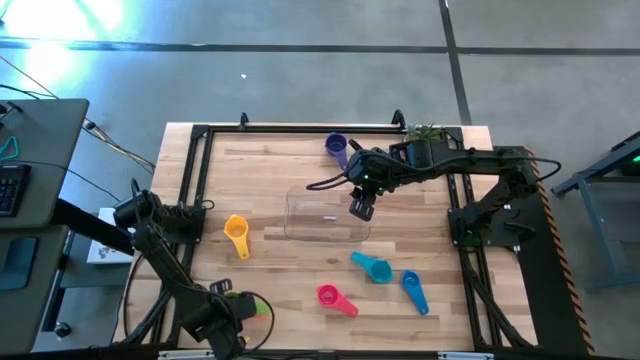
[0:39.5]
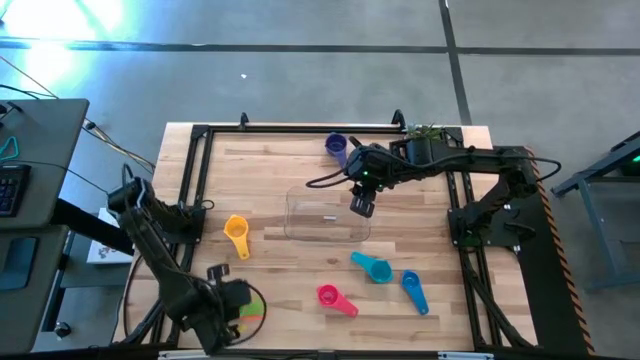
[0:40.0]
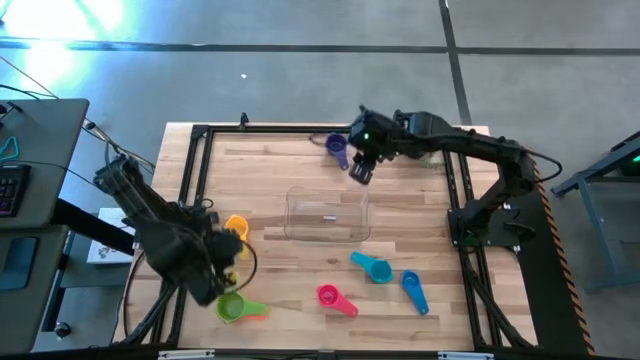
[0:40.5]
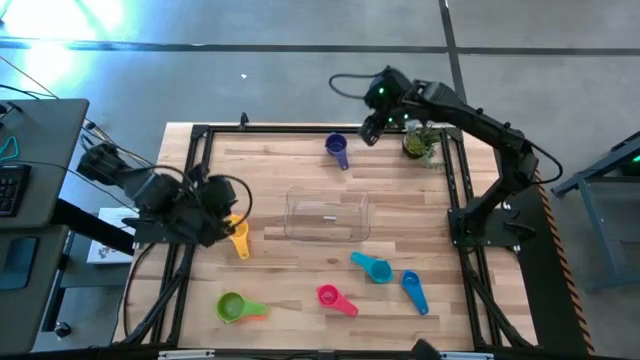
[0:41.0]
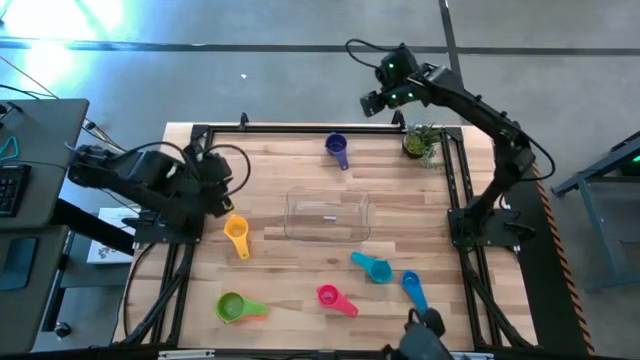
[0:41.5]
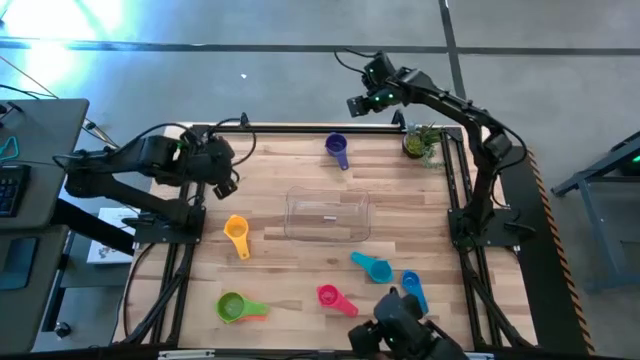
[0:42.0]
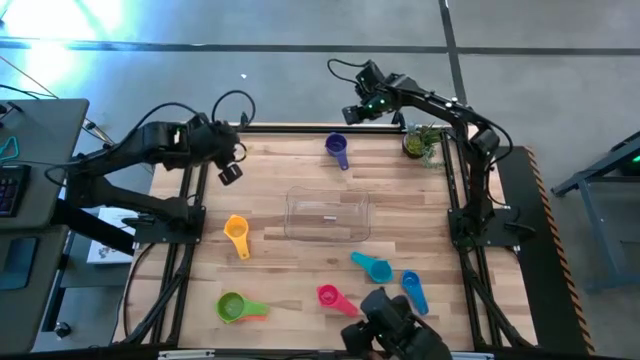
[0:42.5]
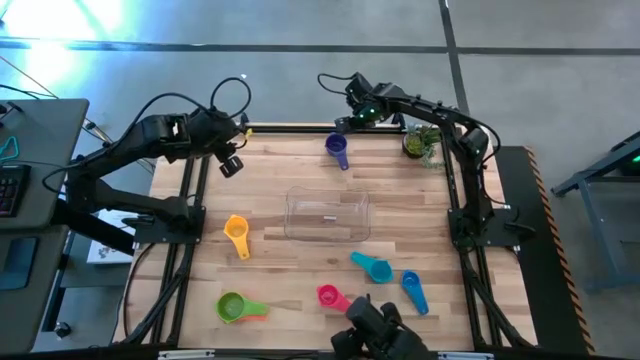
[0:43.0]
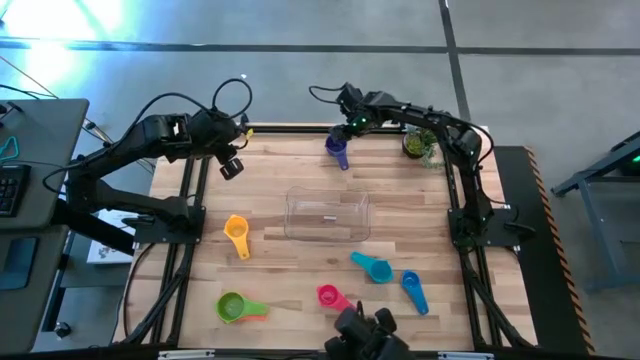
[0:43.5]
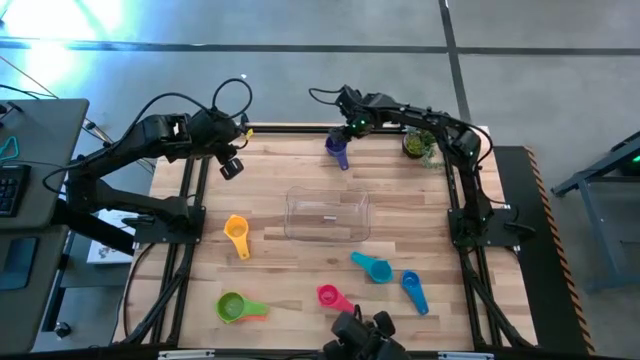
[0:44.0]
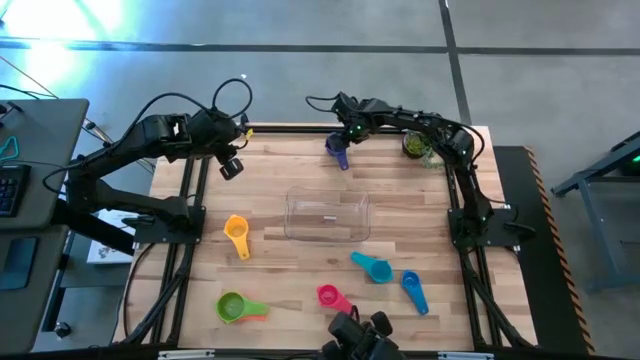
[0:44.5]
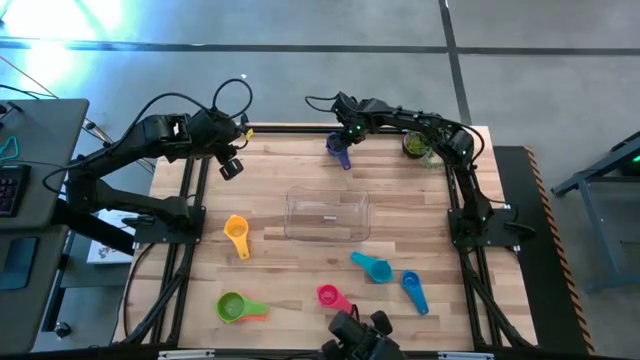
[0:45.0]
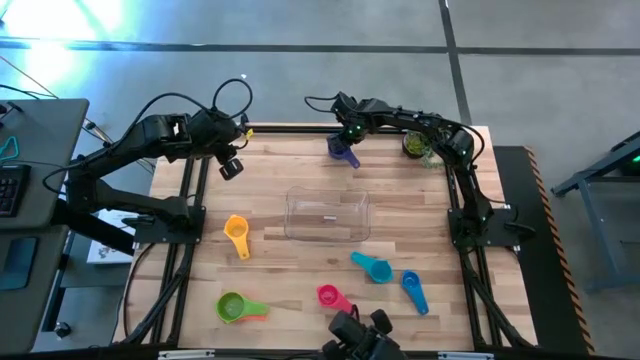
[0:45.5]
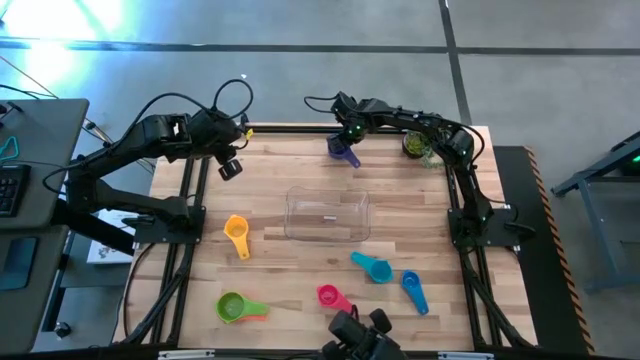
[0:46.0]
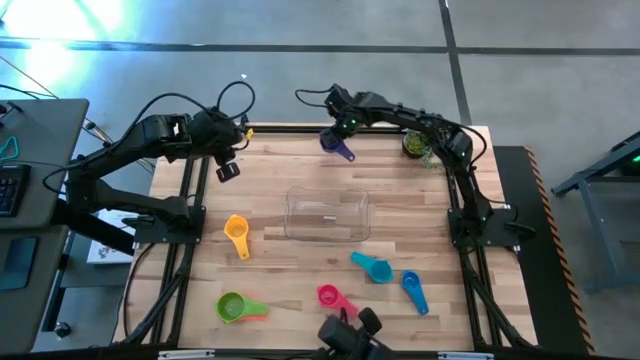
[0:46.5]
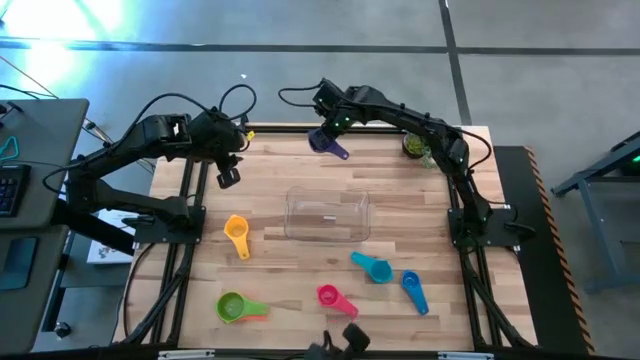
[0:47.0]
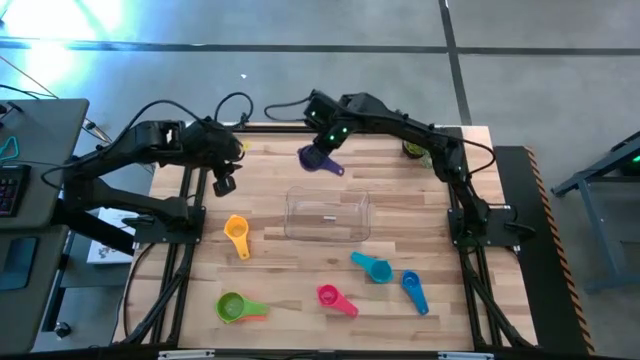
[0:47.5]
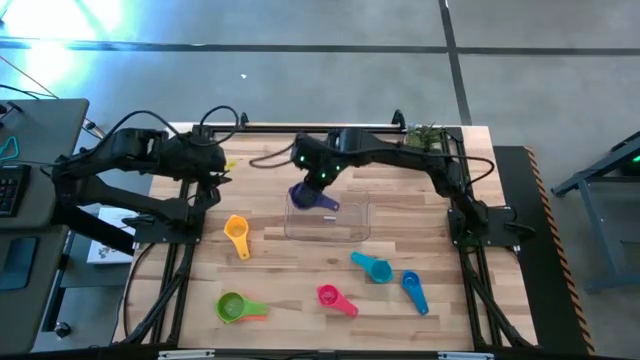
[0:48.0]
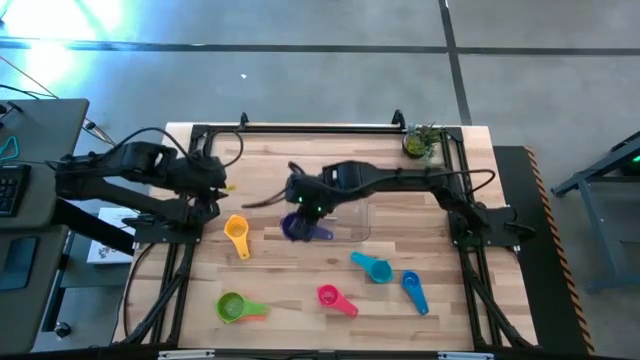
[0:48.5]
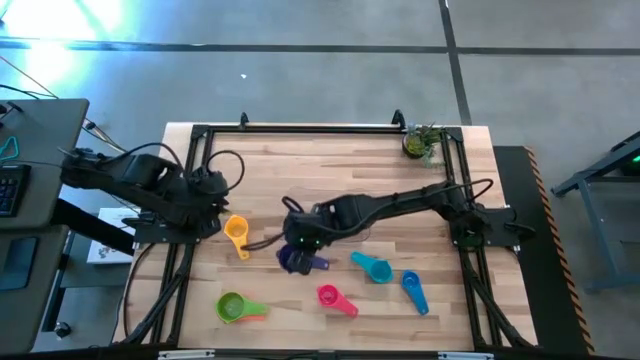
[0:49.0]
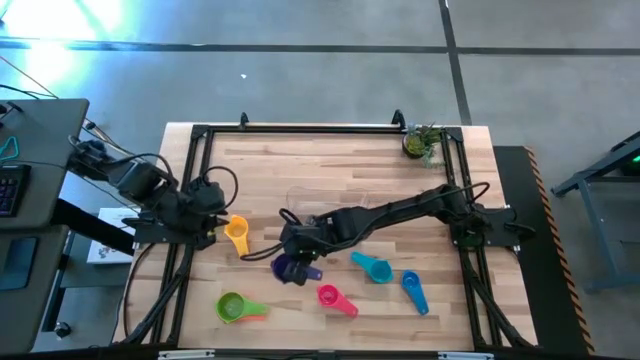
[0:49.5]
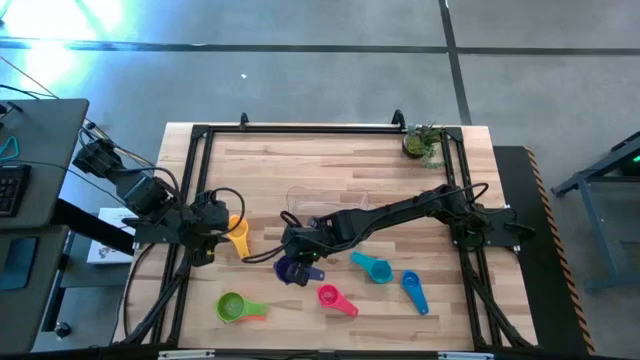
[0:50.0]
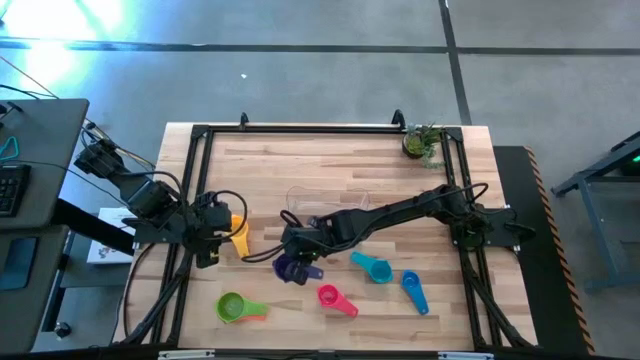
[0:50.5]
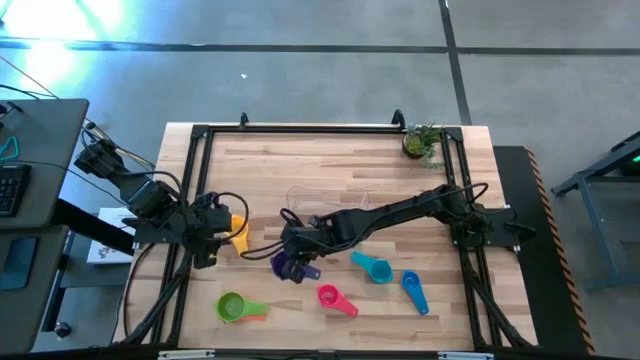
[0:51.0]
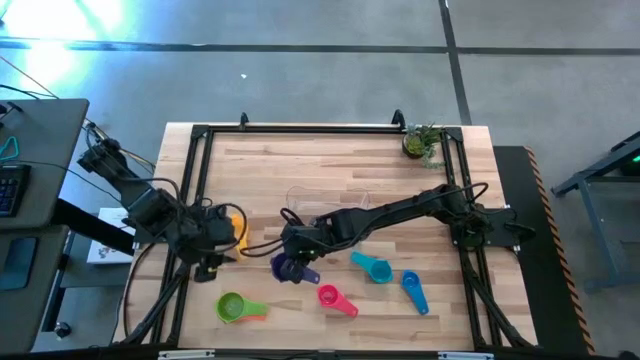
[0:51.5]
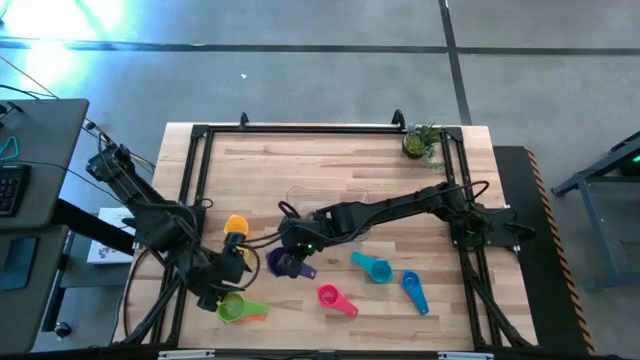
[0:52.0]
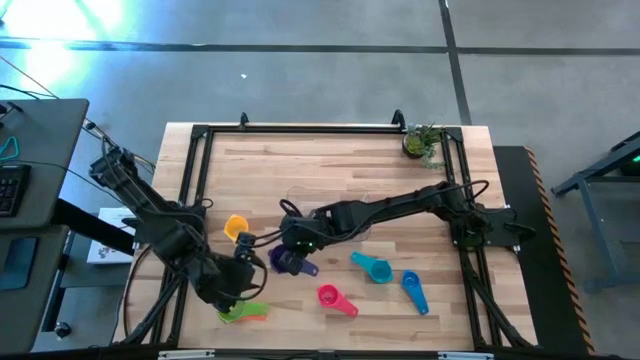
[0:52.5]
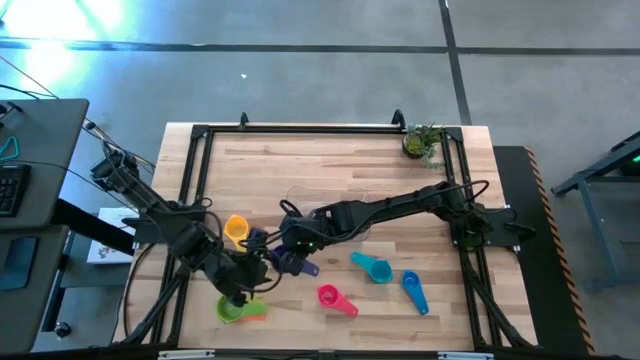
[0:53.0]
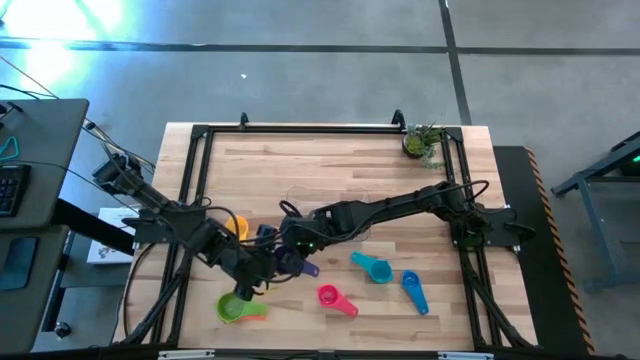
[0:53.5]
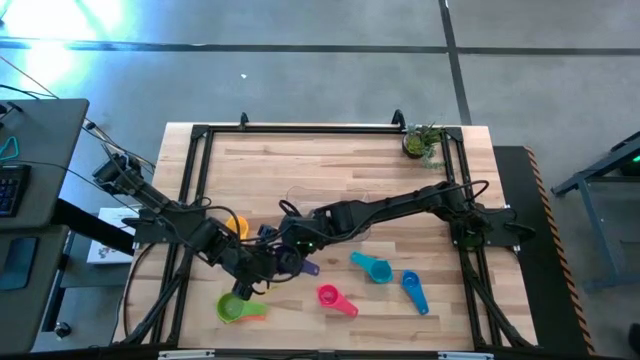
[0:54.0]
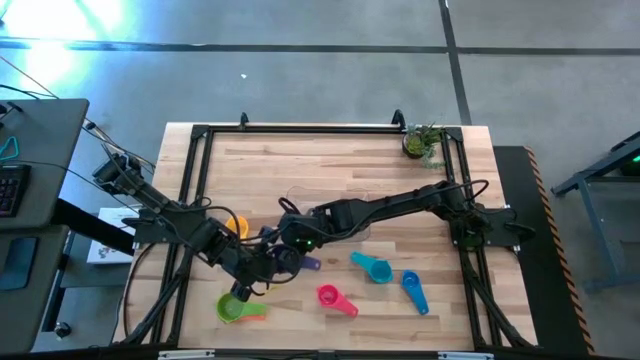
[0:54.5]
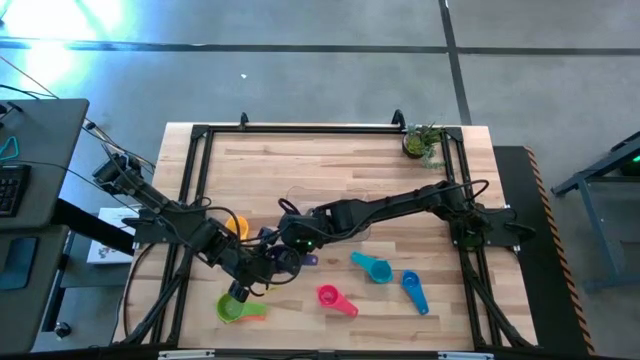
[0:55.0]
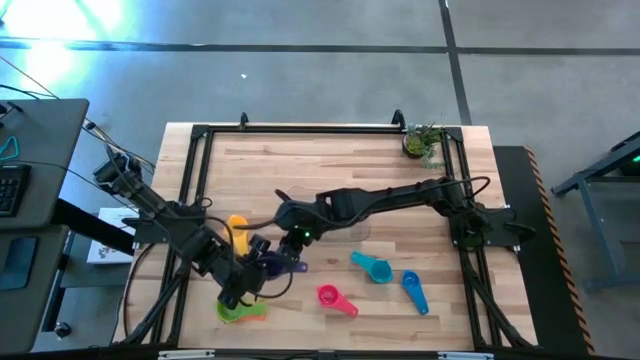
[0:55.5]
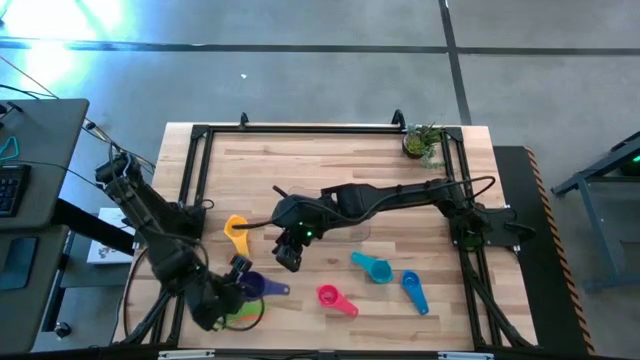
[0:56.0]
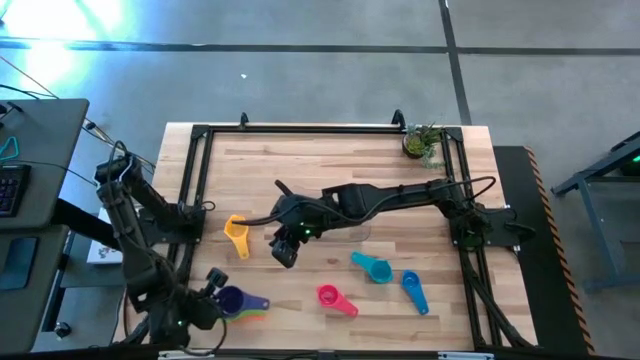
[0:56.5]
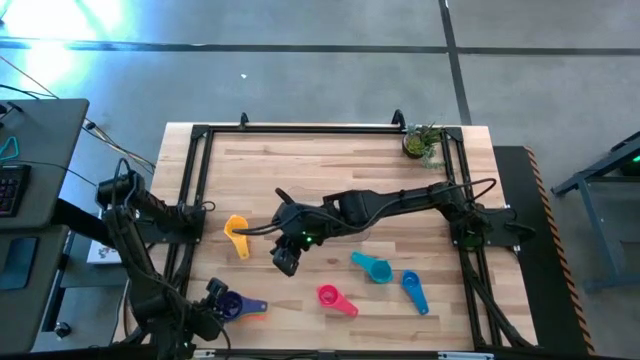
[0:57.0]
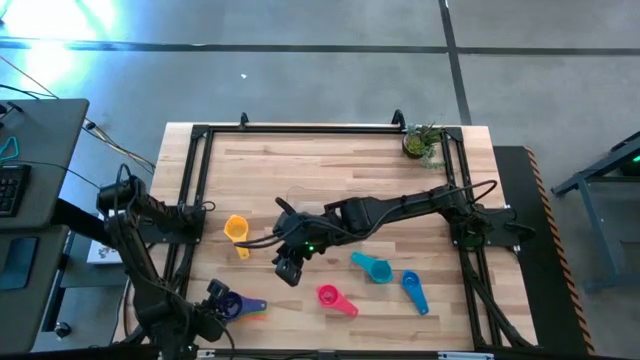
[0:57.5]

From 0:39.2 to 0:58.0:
Task: Nest measuring cups in basket
Stack the dark blue measuring cup on top of the green measuring cup
